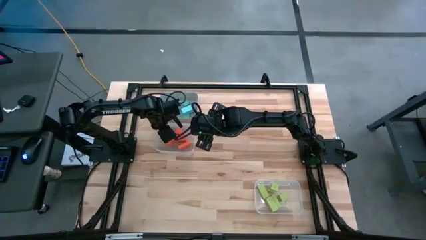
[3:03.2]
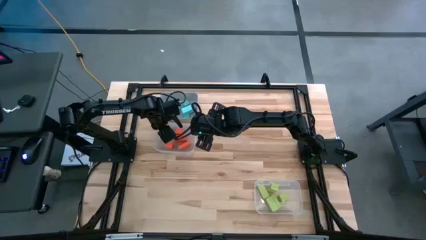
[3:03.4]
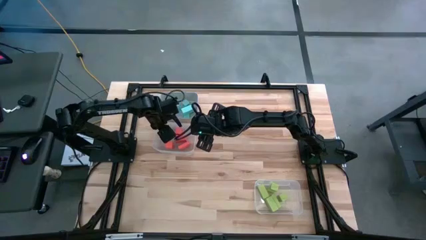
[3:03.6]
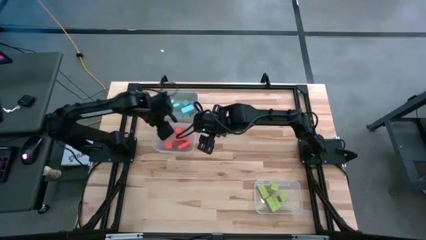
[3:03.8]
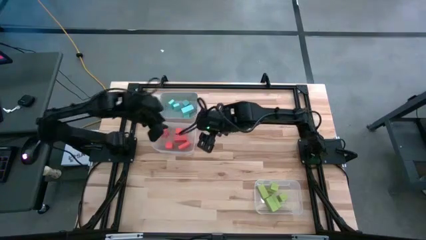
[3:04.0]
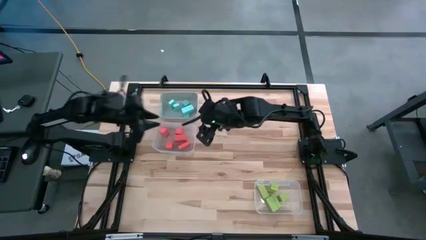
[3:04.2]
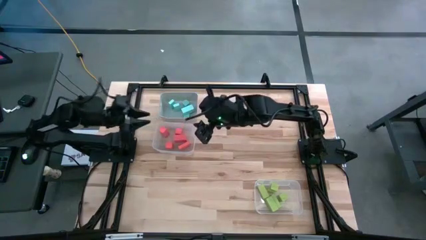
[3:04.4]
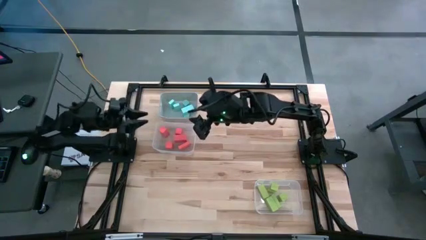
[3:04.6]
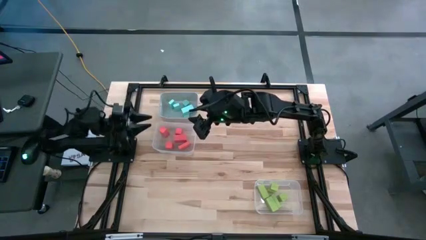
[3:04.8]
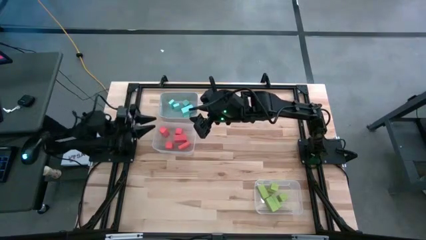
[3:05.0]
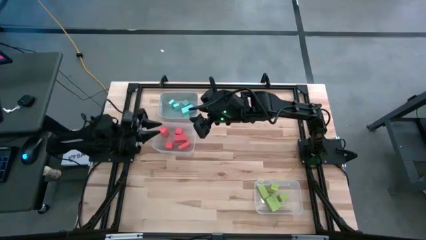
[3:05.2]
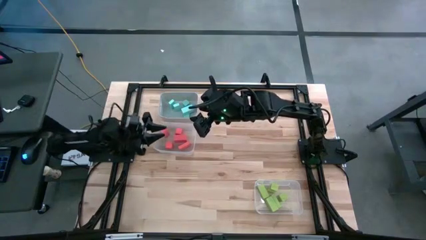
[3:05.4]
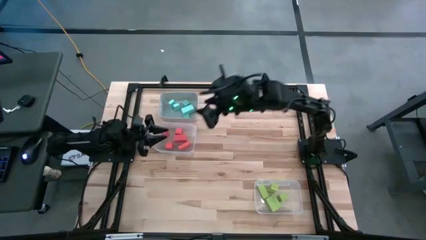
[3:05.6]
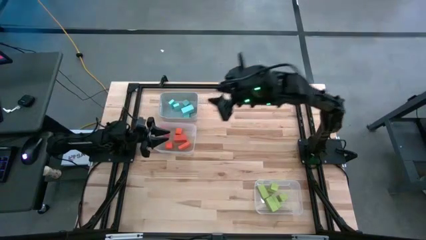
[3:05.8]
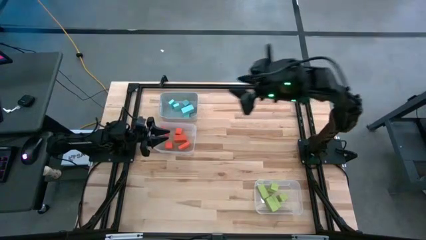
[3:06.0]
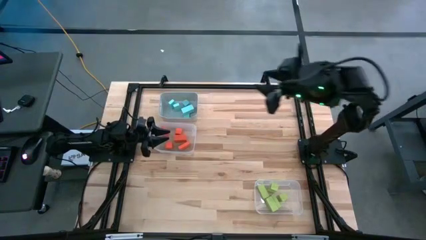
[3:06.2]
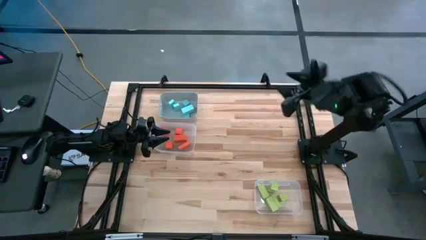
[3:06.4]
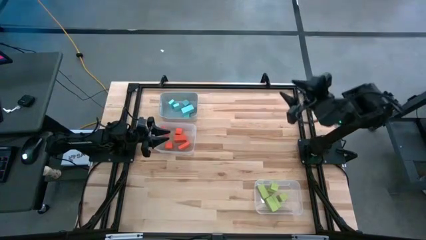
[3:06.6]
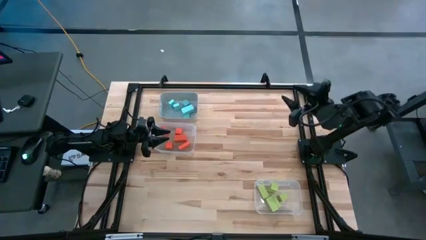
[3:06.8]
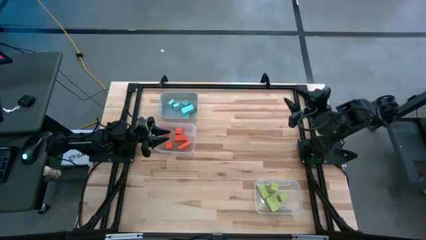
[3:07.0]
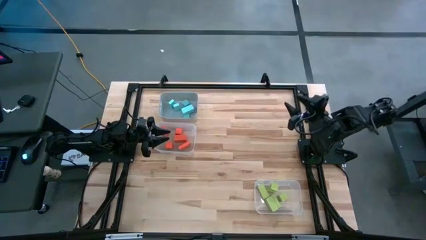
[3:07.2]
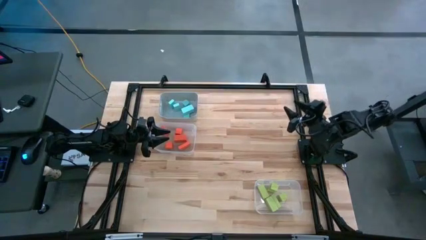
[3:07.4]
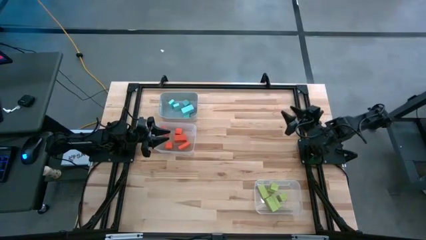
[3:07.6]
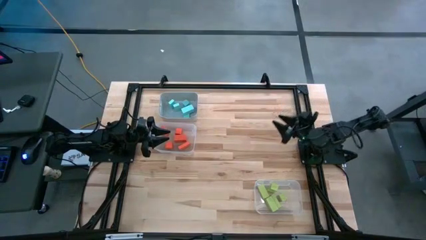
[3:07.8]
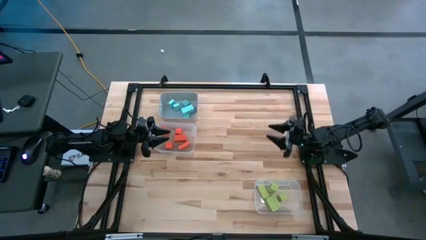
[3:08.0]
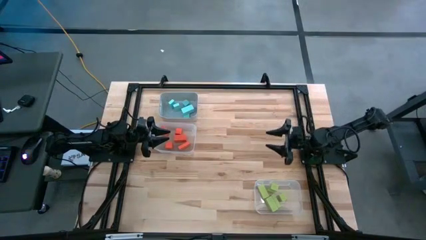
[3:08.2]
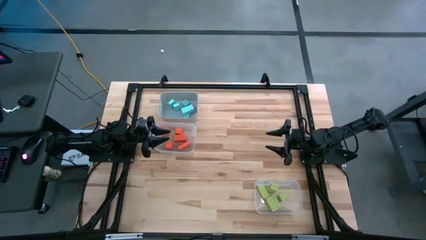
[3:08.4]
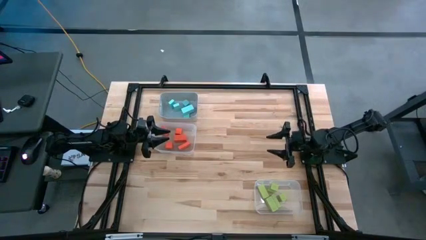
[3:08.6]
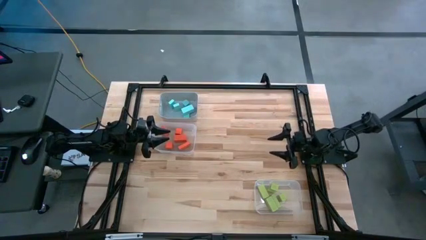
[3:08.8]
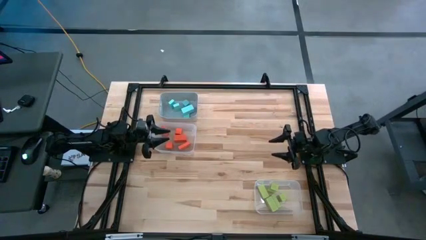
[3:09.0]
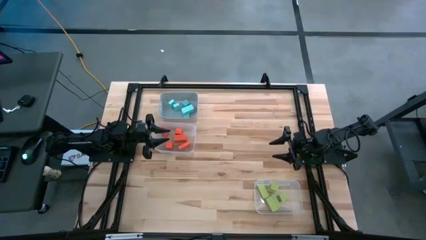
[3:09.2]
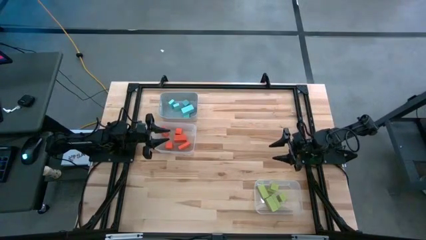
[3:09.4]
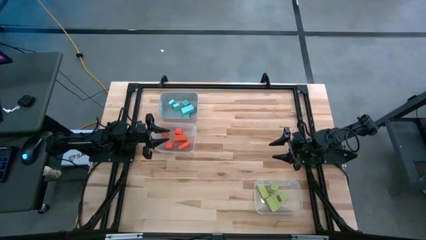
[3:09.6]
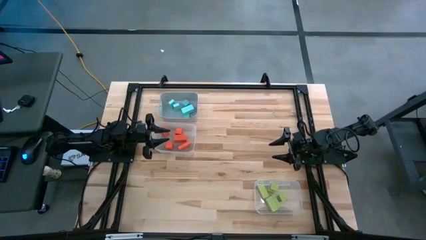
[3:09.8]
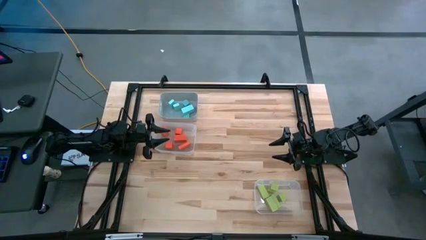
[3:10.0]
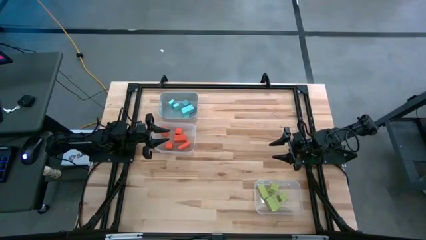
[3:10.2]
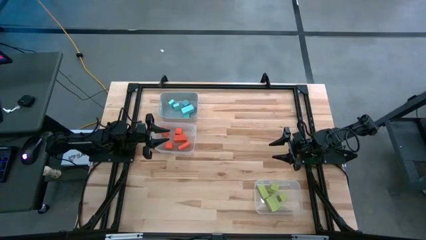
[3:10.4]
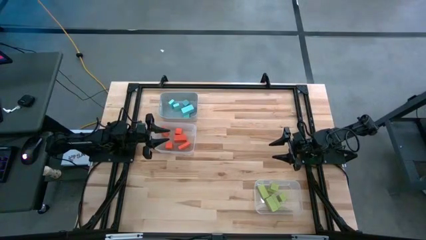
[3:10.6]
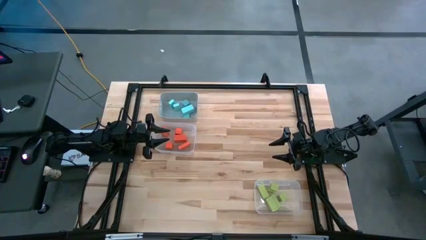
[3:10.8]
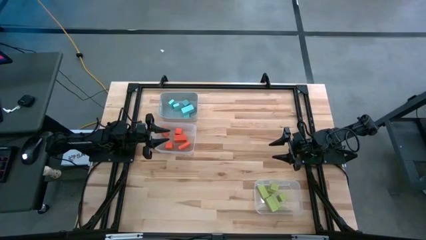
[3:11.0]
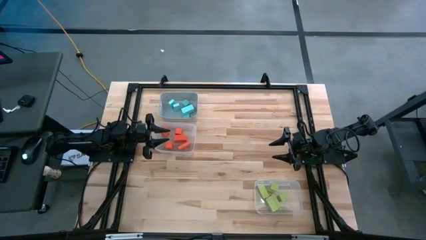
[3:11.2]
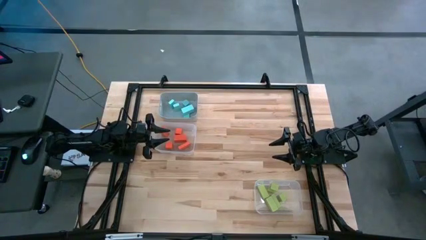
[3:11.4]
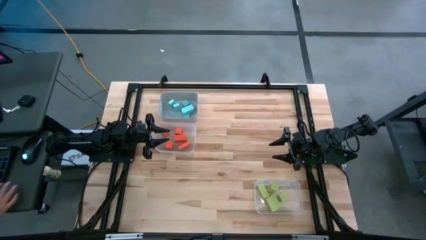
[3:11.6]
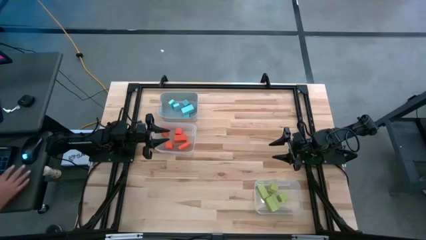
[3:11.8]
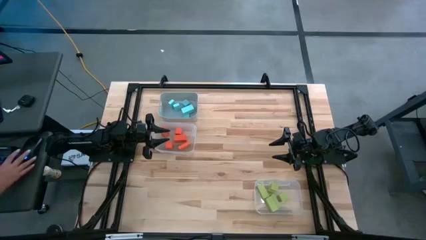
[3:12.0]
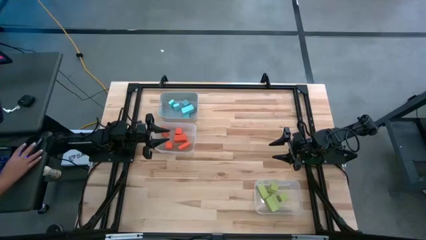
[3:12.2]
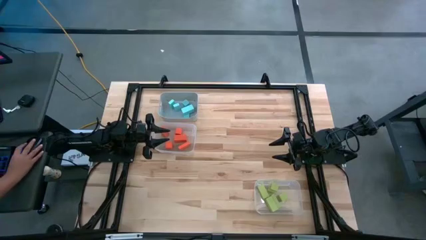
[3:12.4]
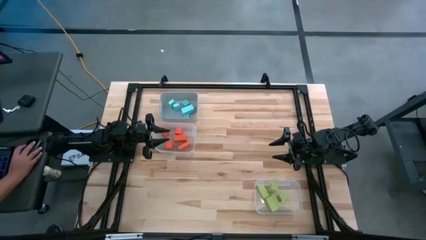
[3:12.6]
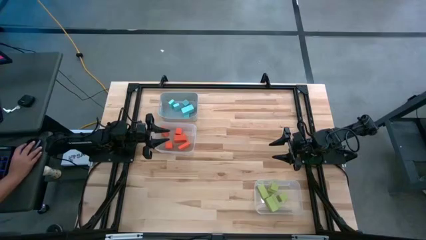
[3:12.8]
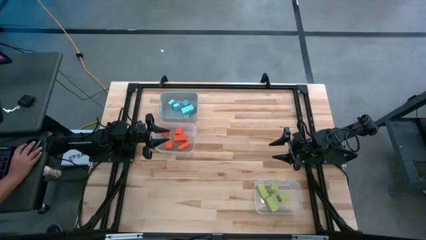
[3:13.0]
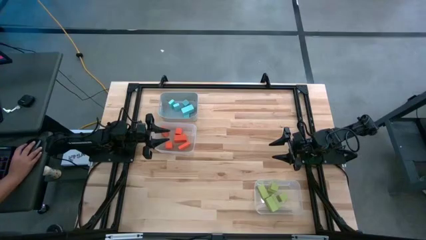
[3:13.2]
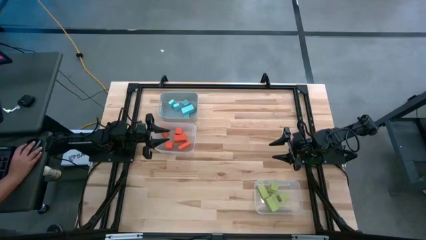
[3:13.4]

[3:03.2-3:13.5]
Task: Sort & place blocks by color
Return to Home Position

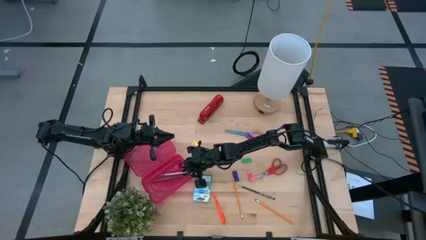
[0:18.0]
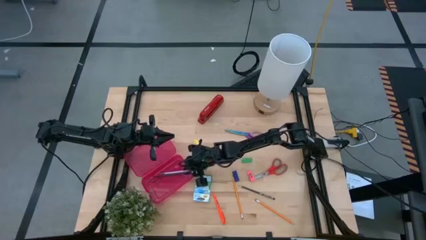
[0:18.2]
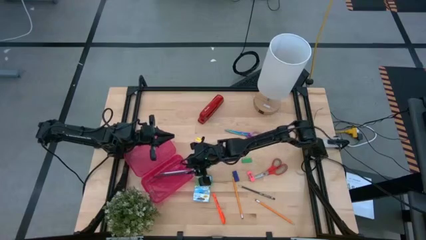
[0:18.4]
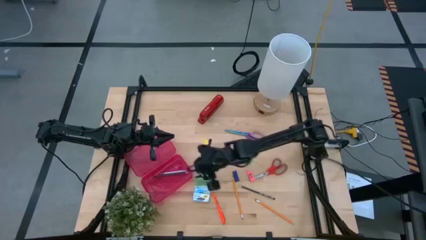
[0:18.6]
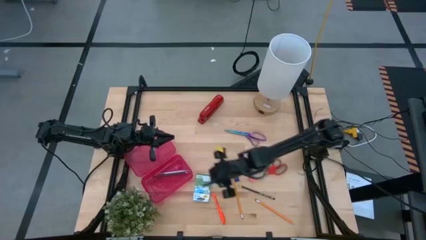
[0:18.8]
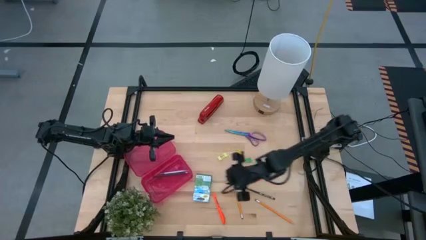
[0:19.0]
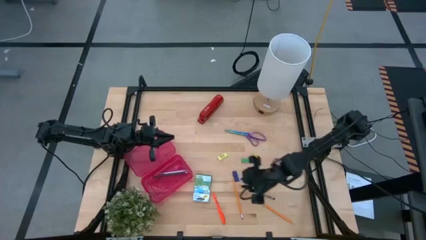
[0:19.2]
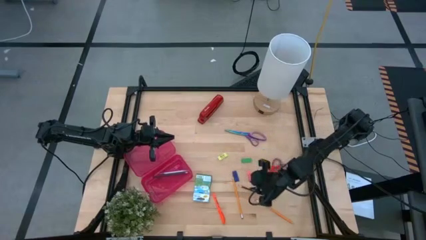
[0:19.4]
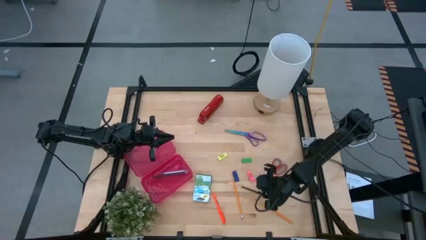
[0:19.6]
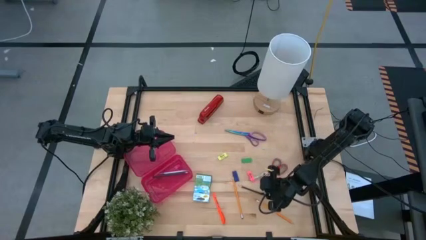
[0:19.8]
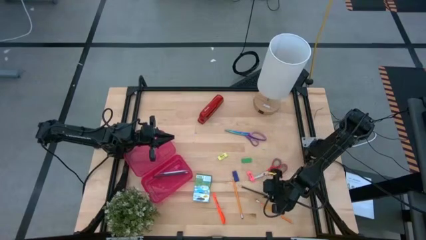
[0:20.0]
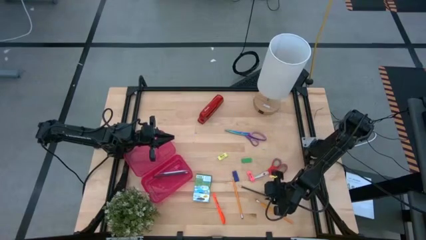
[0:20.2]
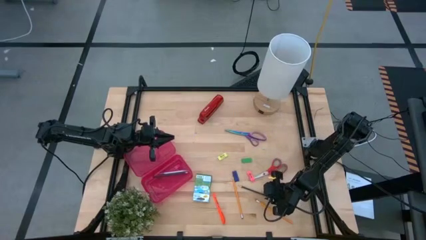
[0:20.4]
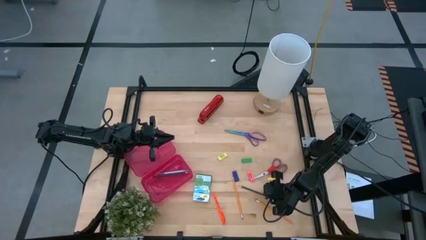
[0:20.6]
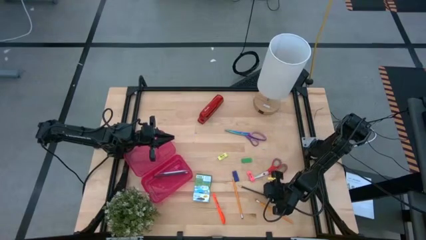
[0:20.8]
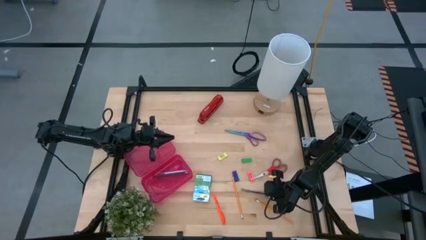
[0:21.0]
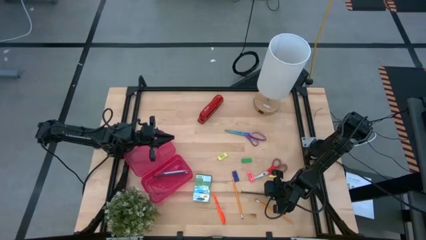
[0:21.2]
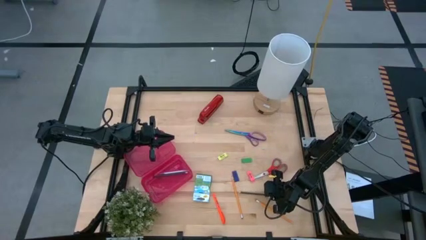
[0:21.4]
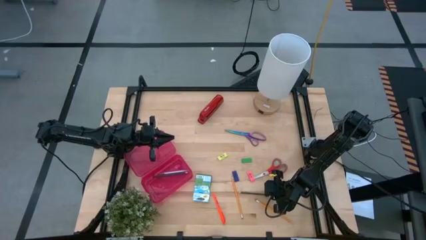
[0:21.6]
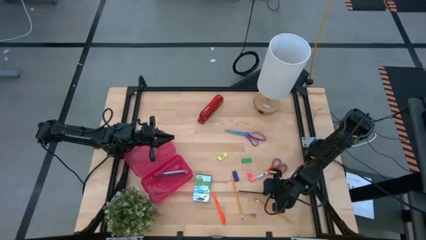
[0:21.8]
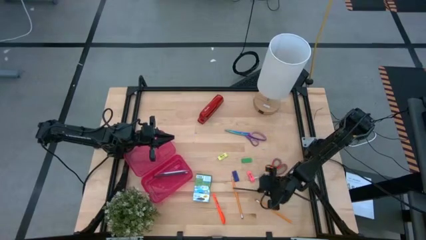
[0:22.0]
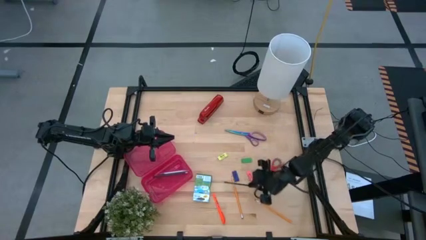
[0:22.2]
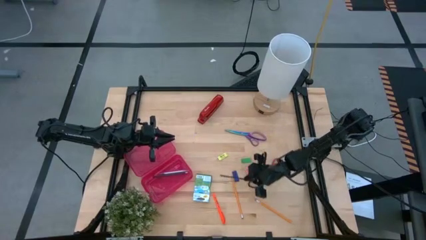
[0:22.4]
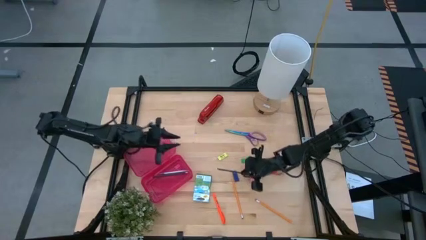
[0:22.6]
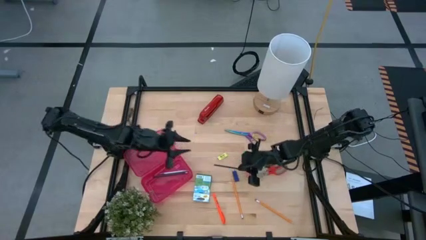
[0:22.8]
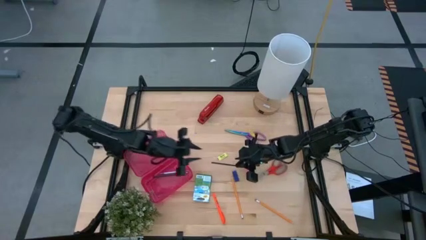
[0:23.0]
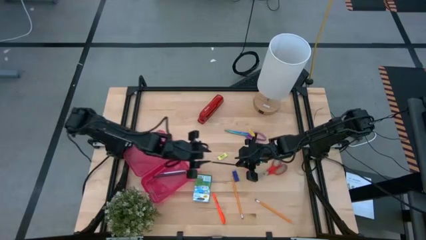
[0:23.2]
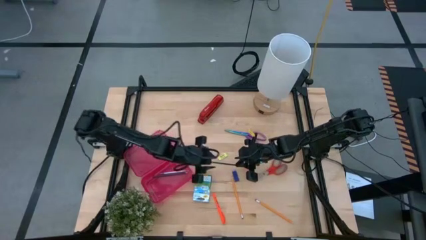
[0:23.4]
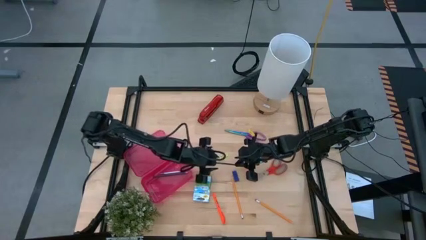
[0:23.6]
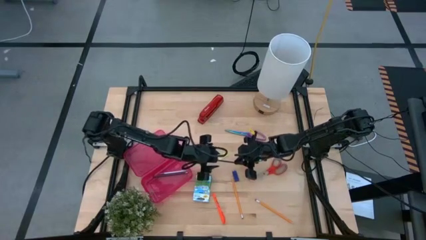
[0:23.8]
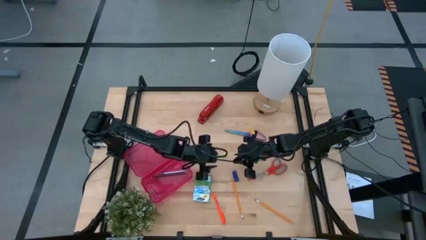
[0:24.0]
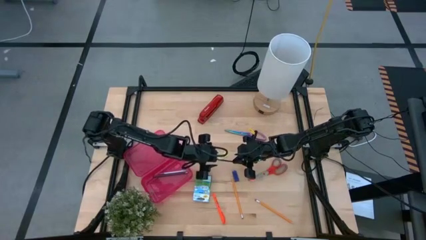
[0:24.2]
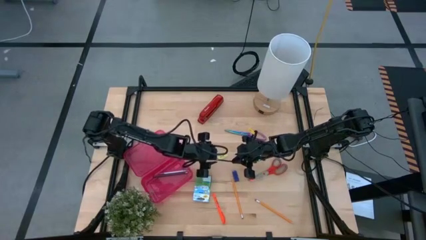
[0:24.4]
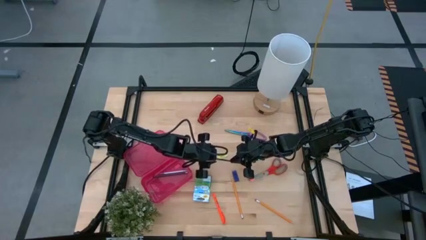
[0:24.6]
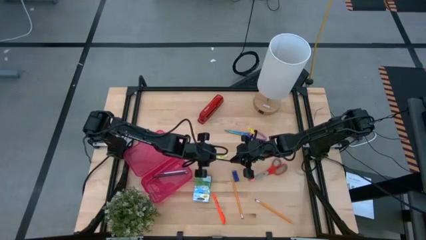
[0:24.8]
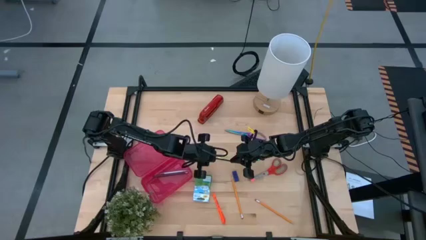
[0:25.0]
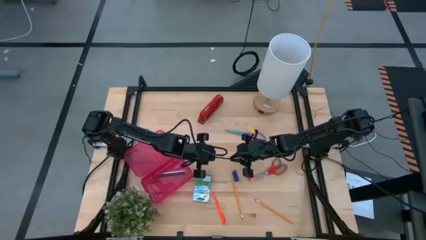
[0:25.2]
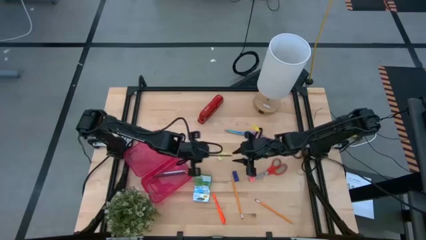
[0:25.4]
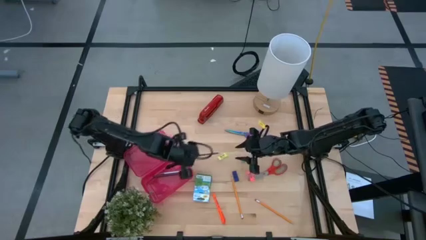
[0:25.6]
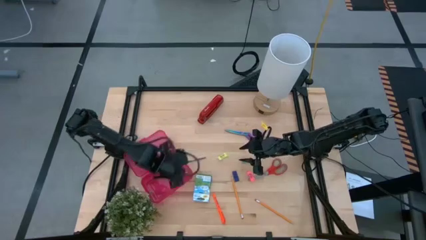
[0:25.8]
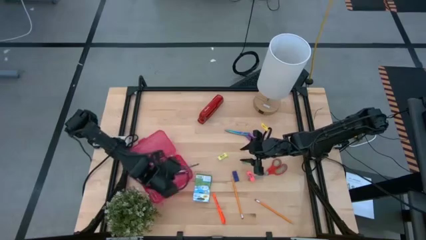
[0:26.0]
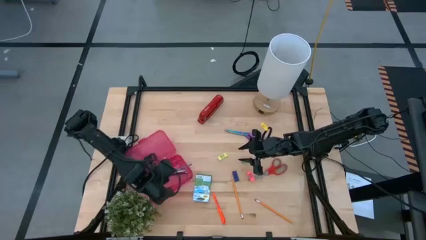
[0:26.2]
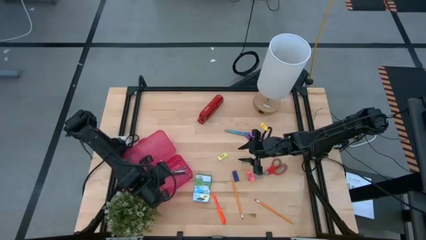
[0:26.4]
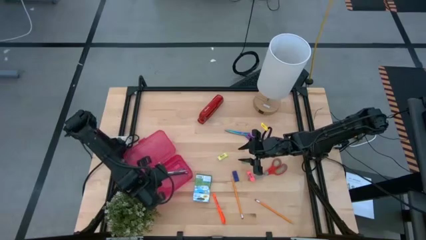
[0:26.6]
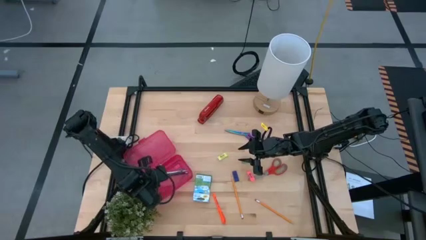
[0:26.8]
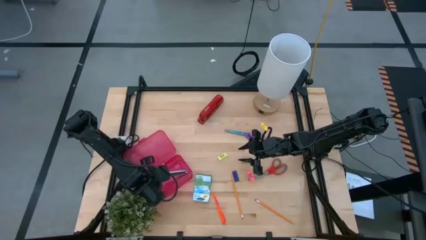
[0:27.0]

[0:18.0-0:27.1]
Task: Pack school essentials
Put the dark blue pencil into the red supply box
